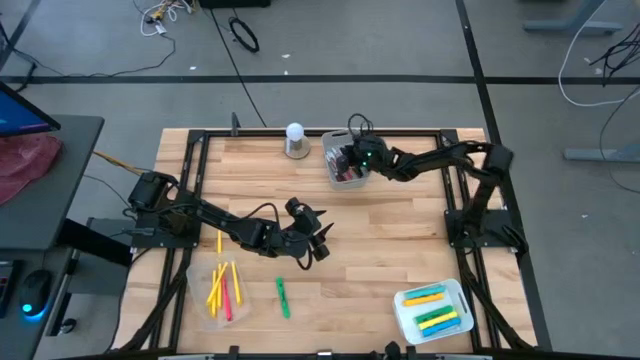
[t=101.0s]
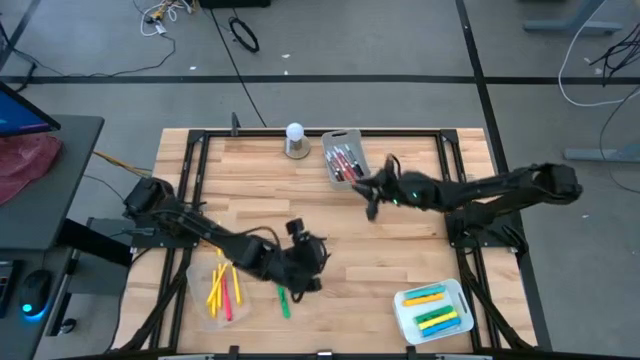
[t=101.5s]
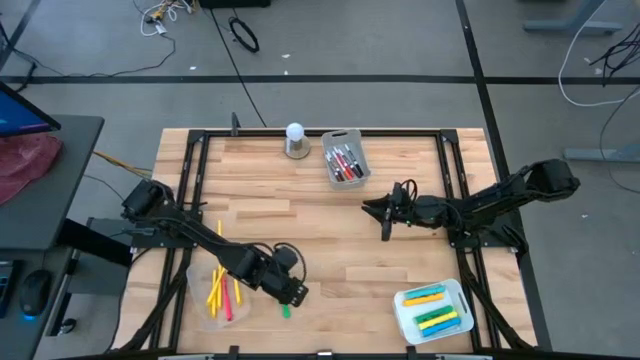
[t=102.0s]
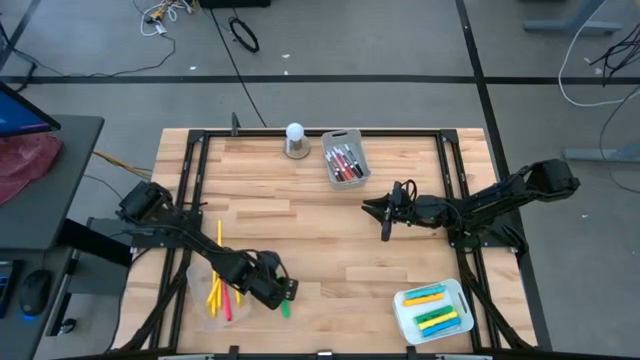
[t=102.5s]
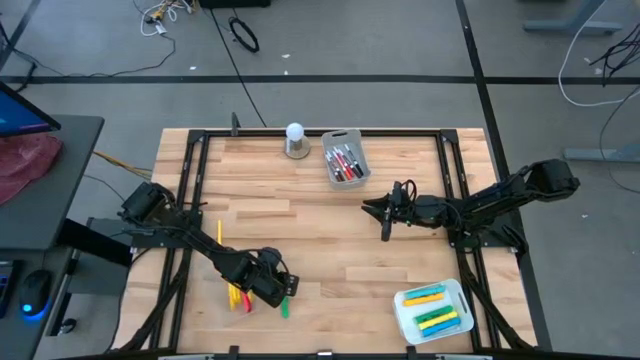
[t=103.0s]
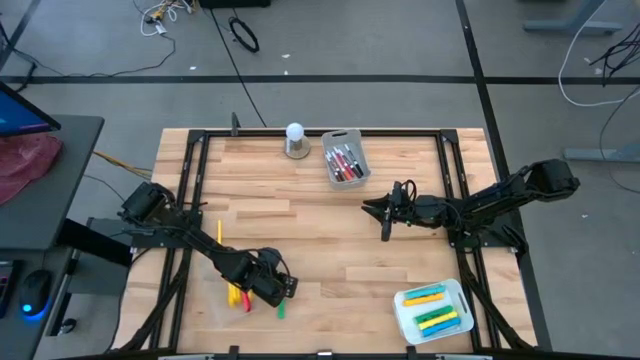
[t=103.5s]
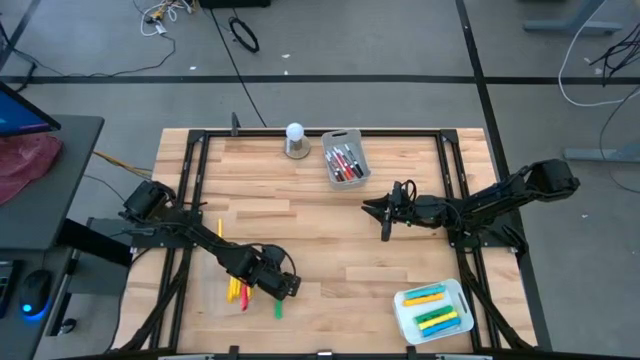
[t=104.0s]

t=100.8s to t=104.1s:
Task: Pick & Place Markers
Put the green highlighter pen into the white bin

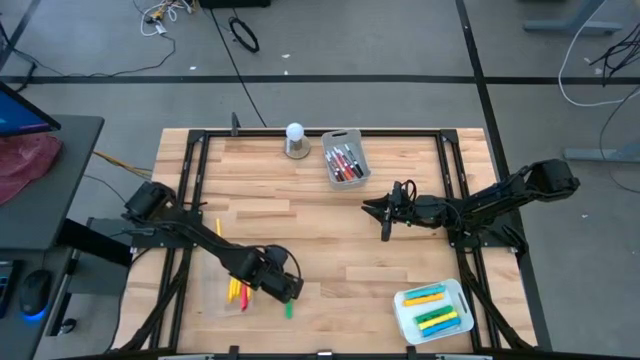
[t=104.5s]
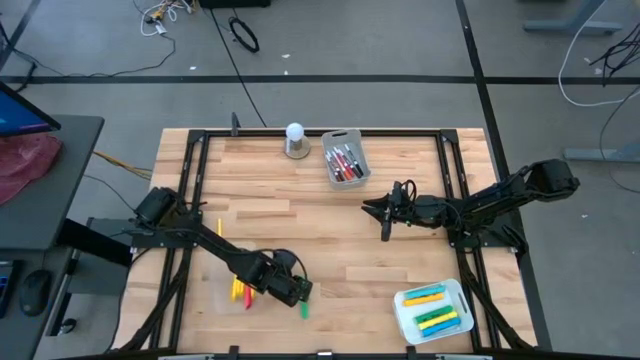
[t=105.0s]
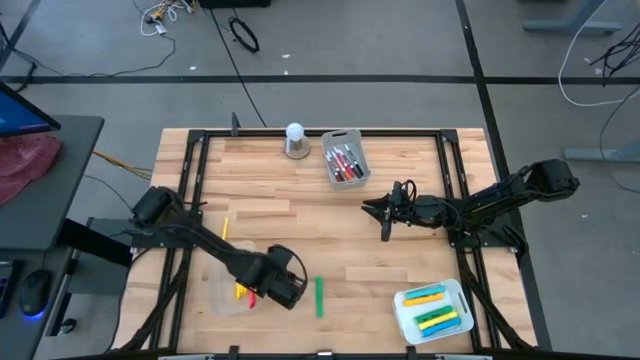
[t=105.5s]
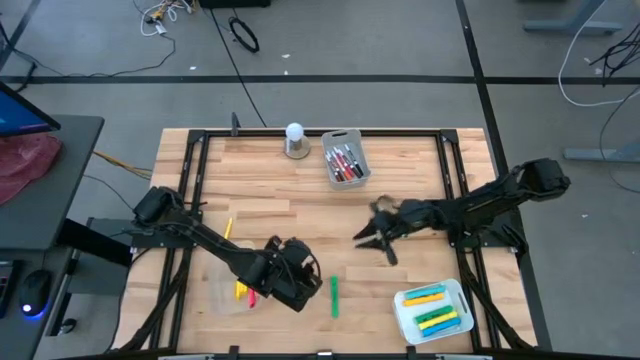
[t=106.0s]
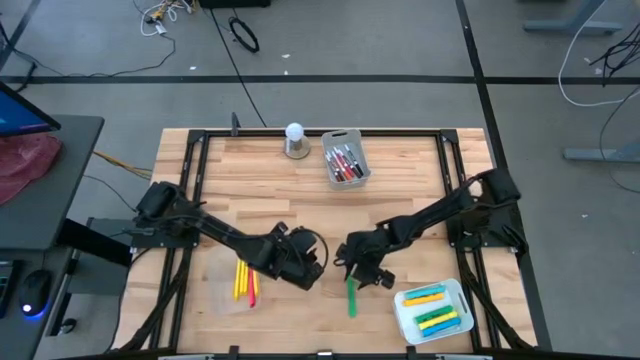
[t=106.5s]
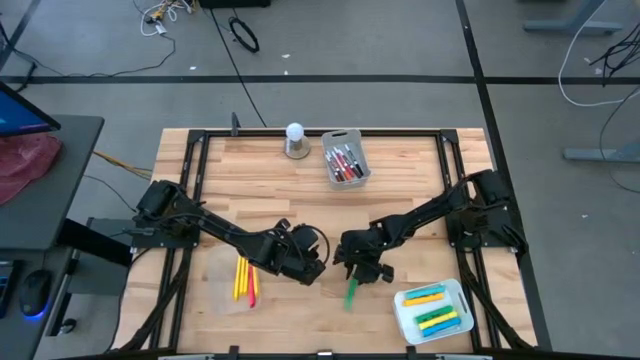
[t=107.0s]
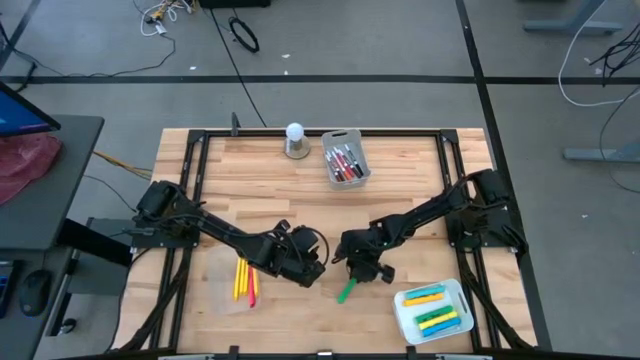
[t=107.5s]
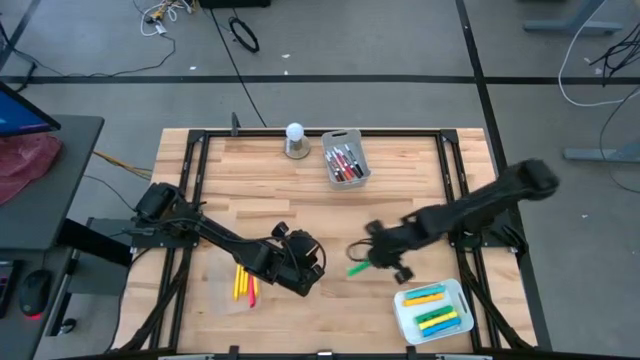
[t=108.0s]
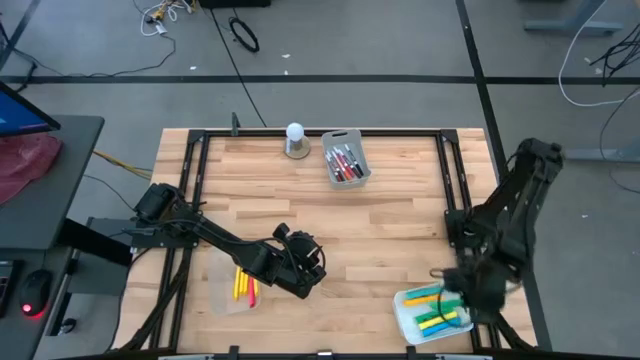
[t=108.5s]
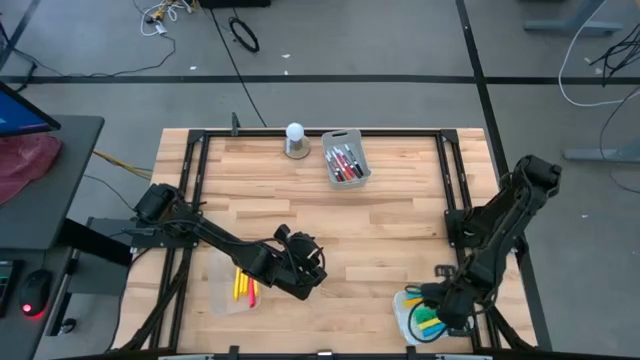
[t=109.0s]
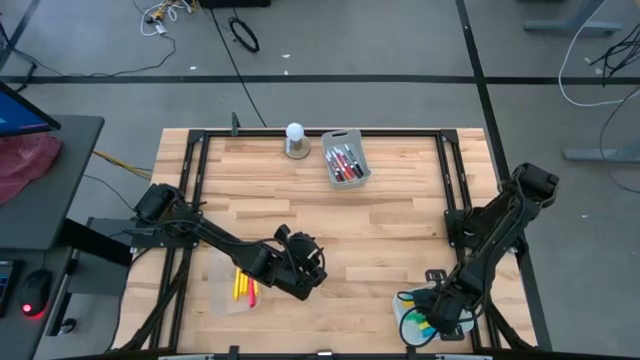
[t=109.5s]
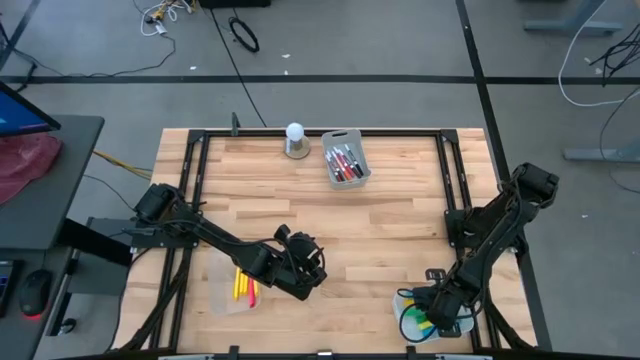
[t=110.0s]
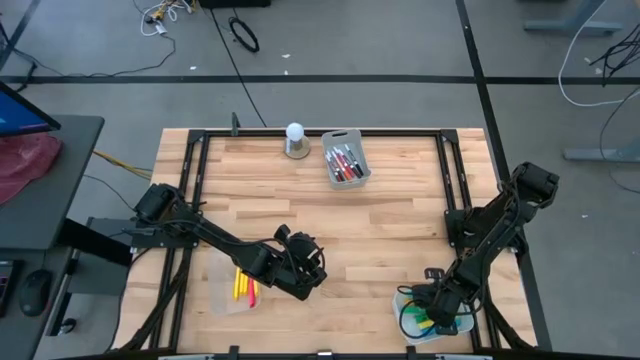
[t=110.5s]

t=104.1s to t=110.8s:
Put the green highlighter pen into the white bin

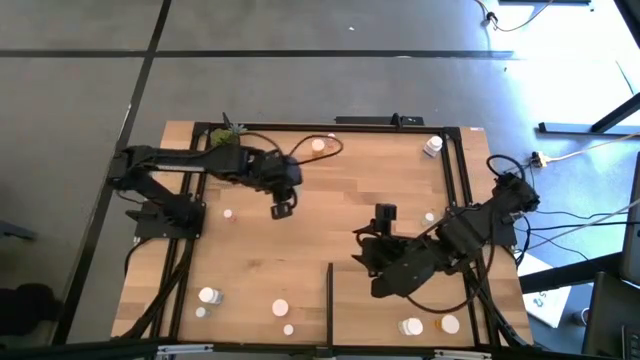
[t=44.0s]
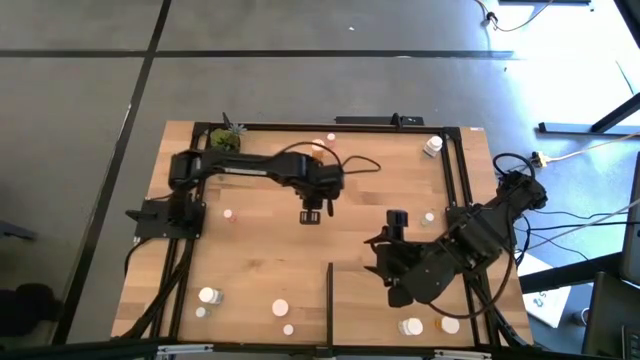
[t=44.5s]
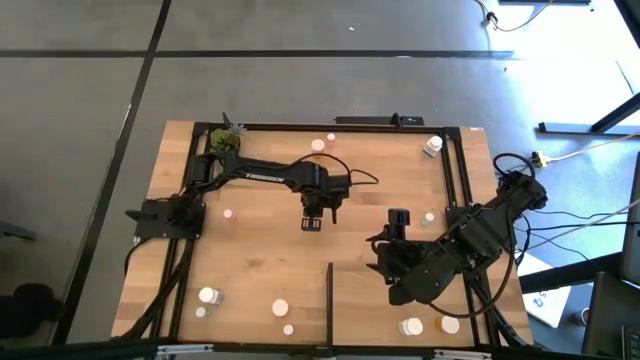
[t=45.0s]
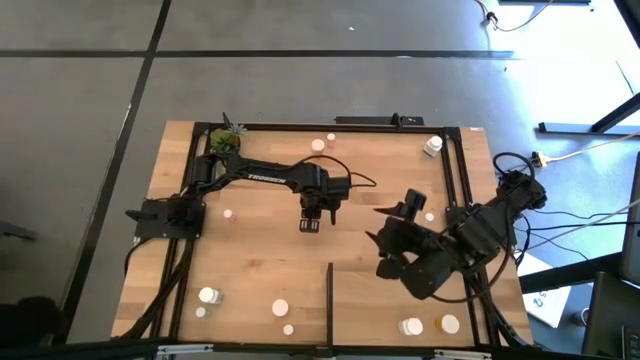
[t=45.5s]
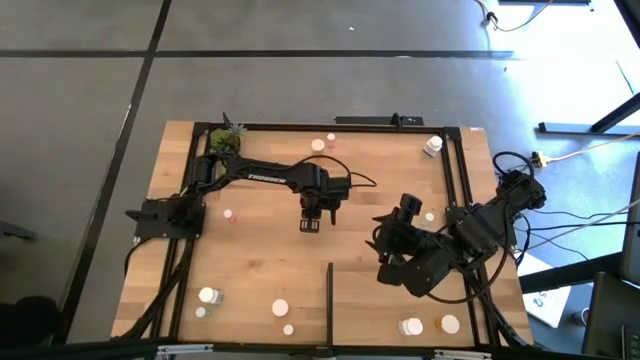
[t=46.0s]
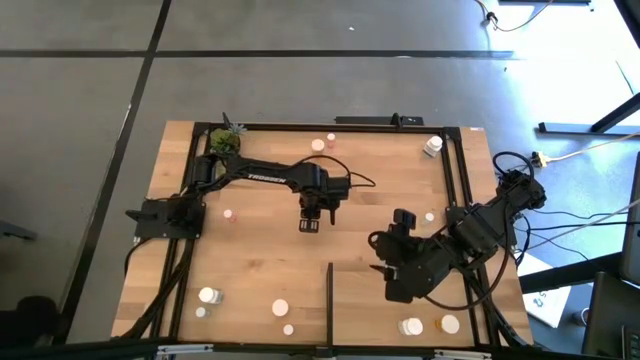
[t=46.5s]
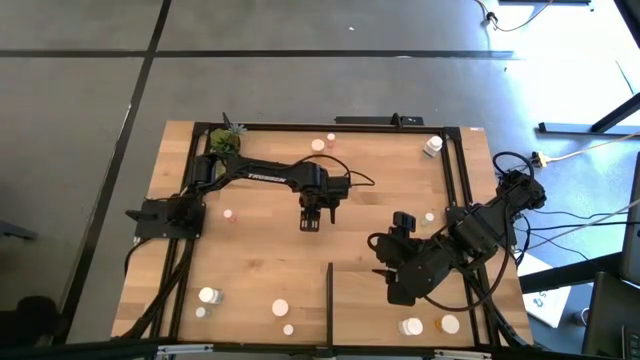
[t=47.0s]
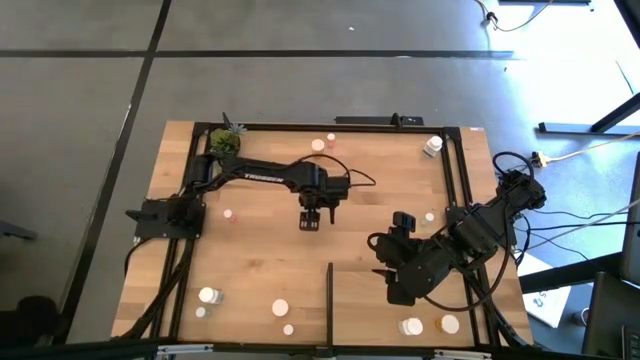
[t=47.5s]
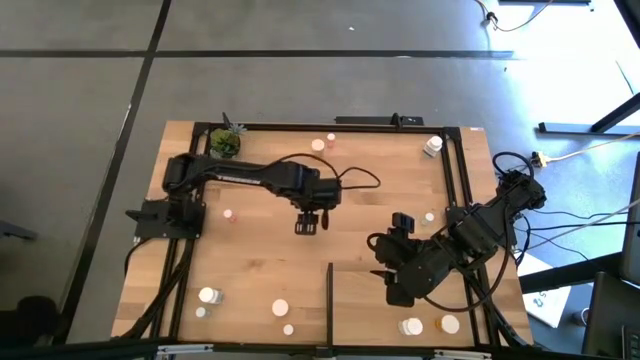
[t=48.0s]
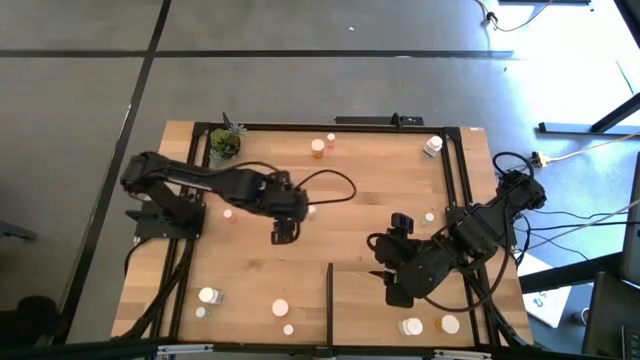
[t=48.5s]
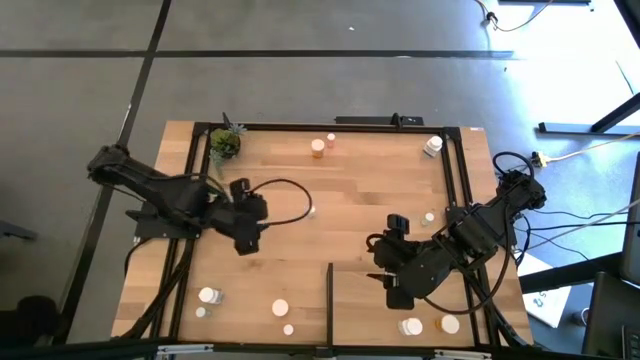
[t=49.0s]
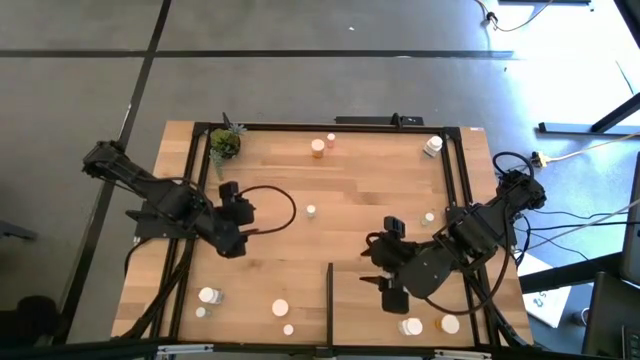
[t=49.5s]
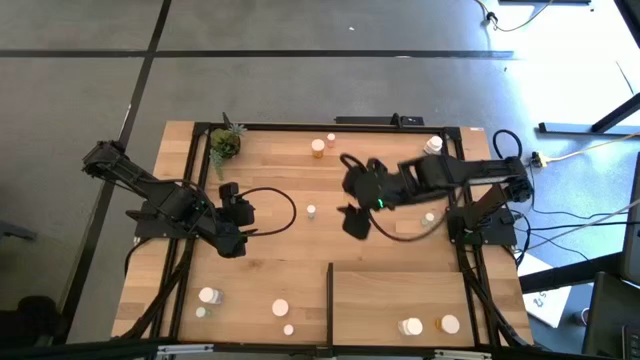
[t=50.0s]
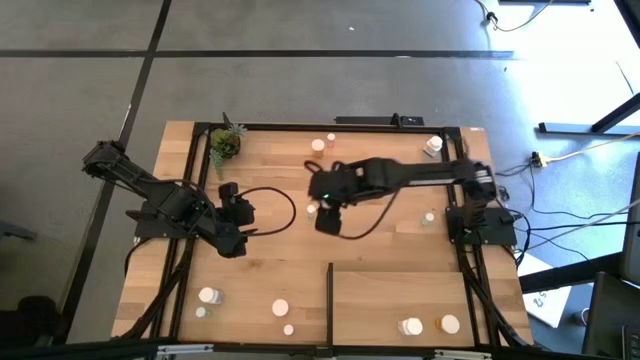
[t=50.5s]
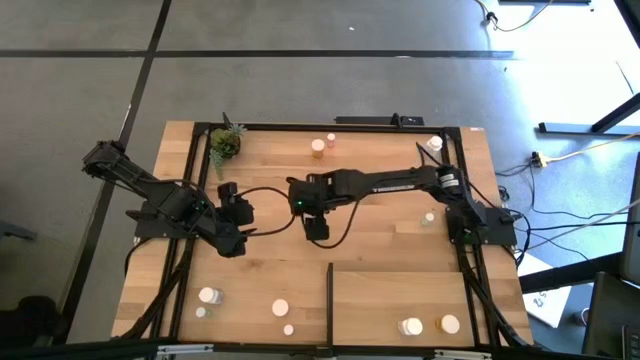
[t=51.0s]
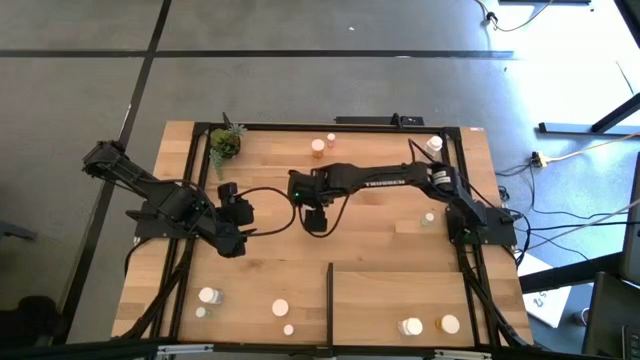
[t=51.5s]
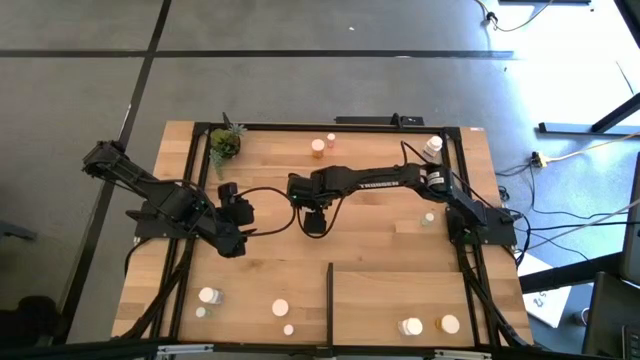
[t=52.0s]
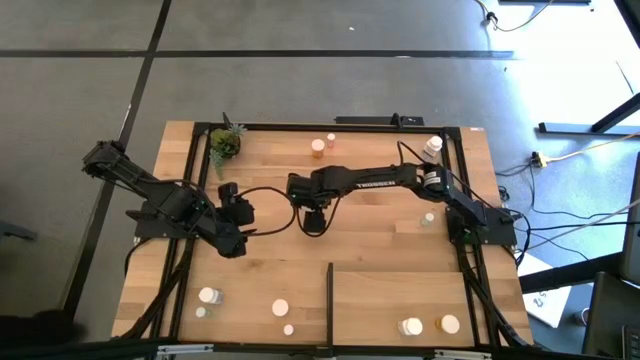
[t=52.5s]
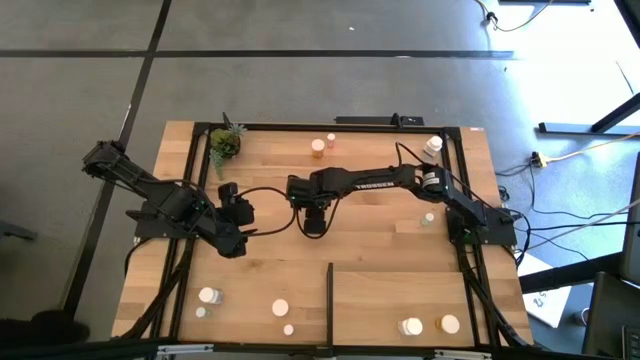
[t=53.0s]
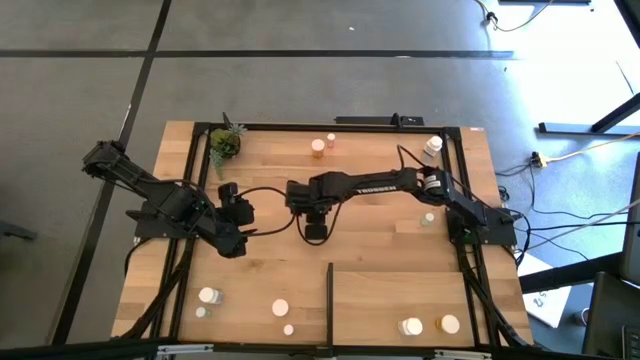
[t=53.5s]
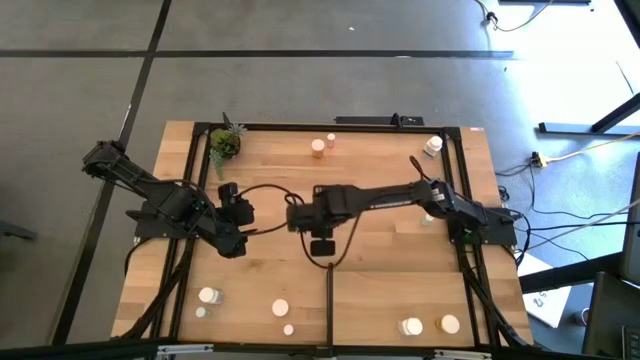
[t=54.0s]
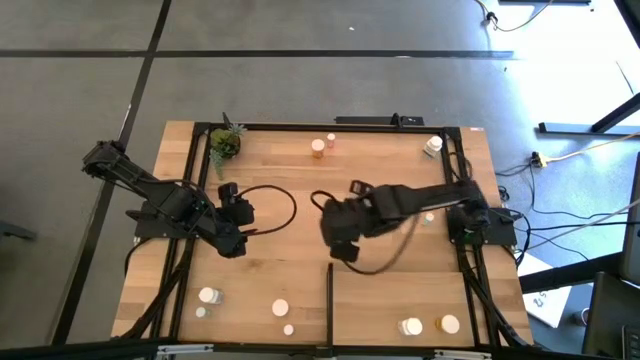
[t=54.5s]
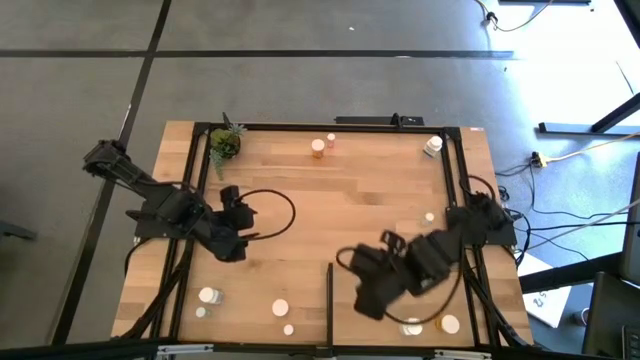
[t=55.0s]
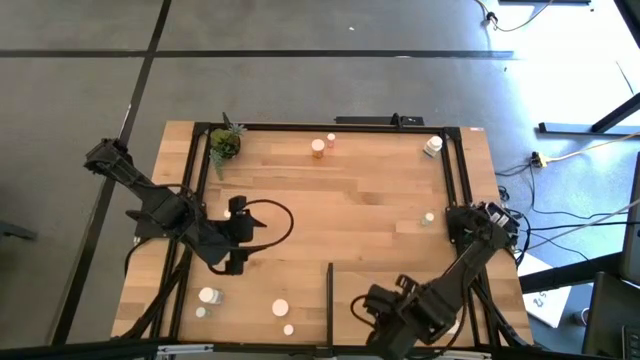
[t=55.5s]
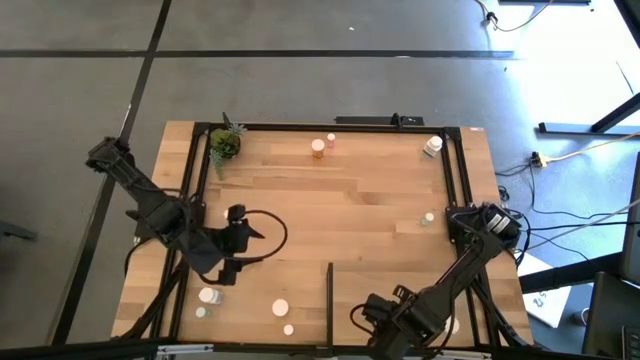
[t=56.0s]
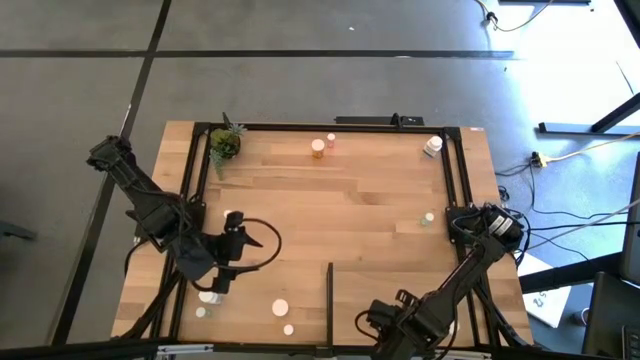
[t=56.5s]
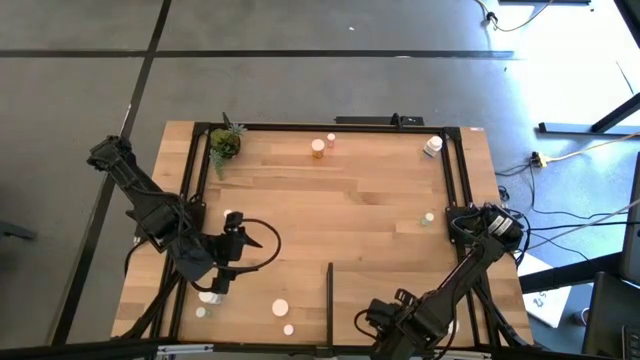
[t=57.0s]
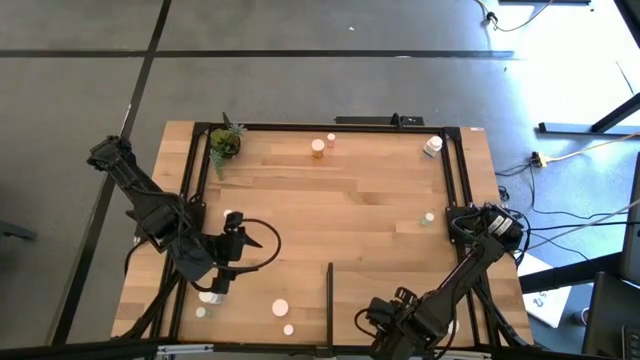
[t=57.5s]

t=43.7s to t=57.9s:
Task: Pick and place medicine bottles onto shelf by color
Put the top left blue pill bottle on the shelf
